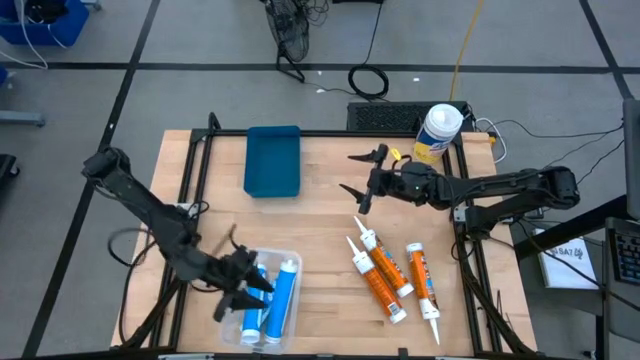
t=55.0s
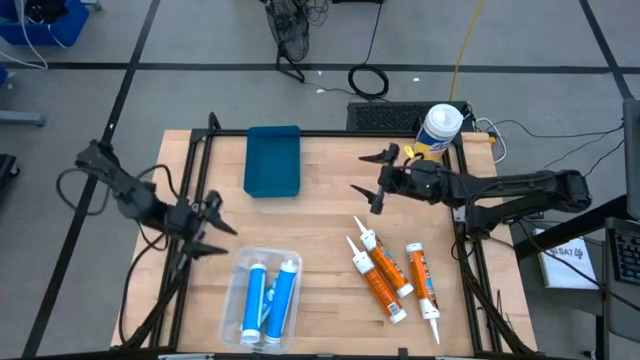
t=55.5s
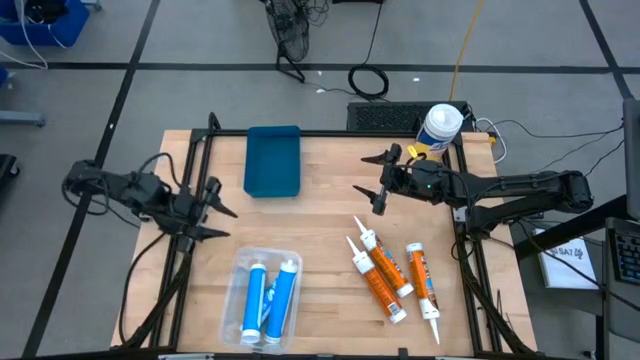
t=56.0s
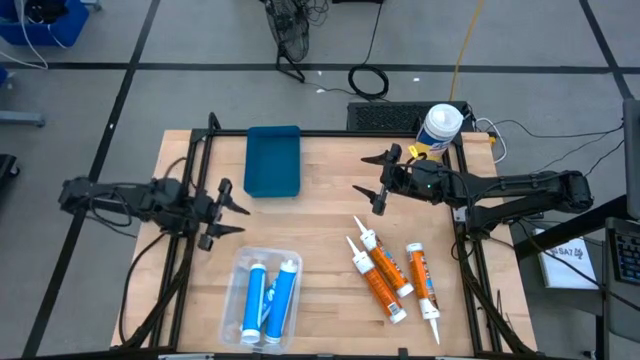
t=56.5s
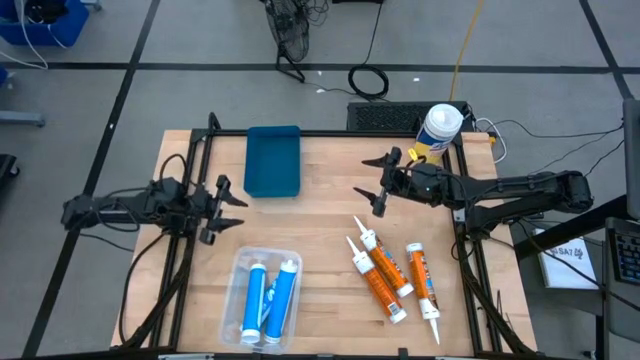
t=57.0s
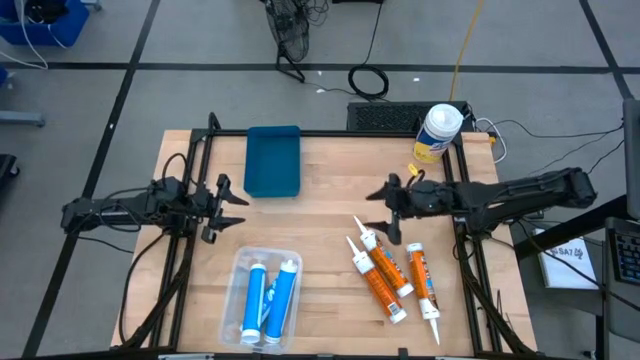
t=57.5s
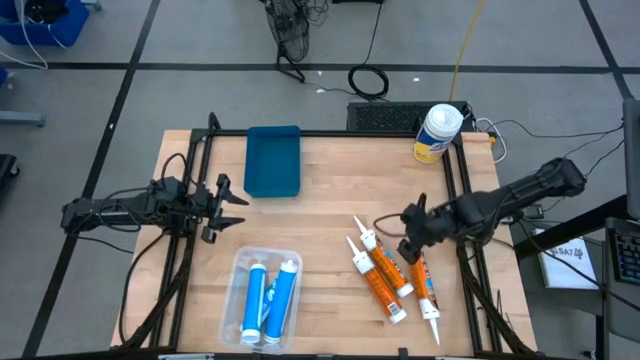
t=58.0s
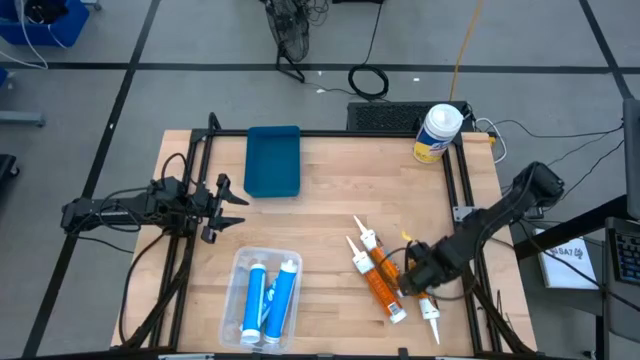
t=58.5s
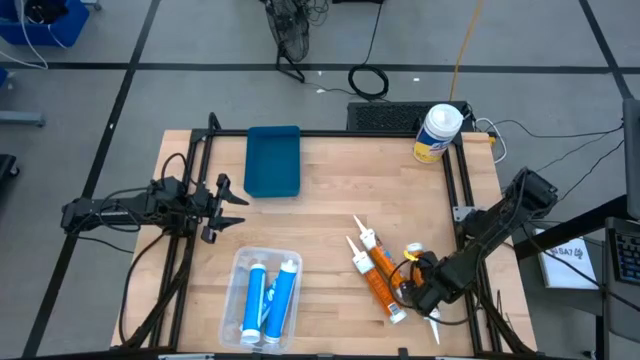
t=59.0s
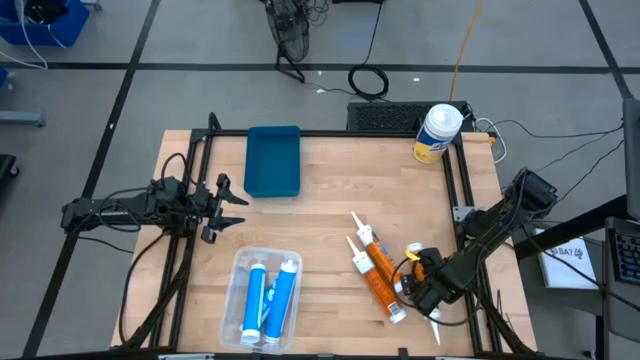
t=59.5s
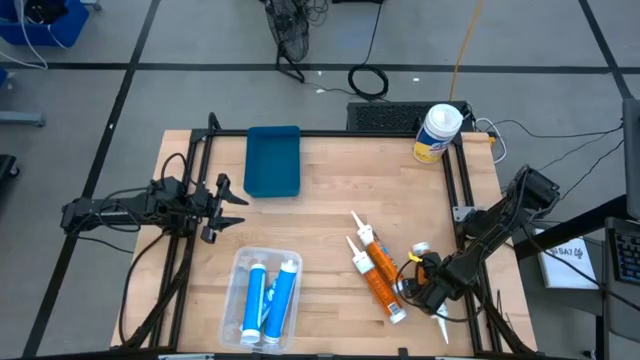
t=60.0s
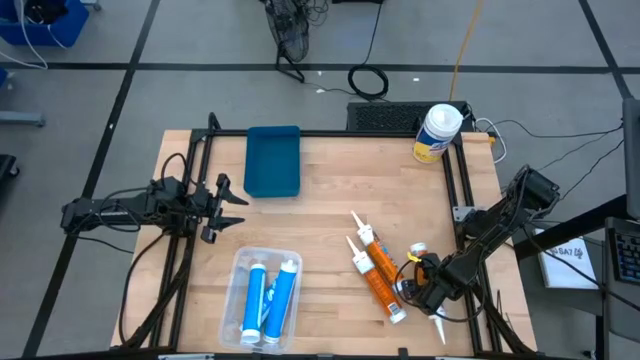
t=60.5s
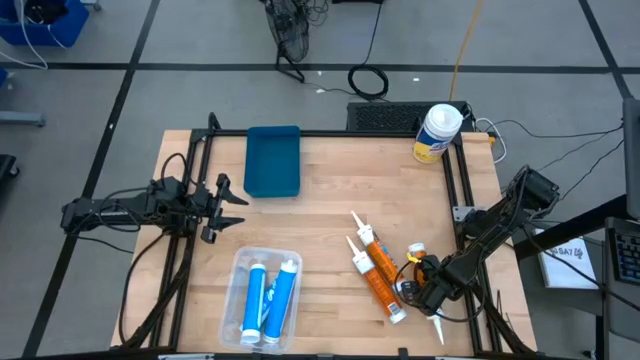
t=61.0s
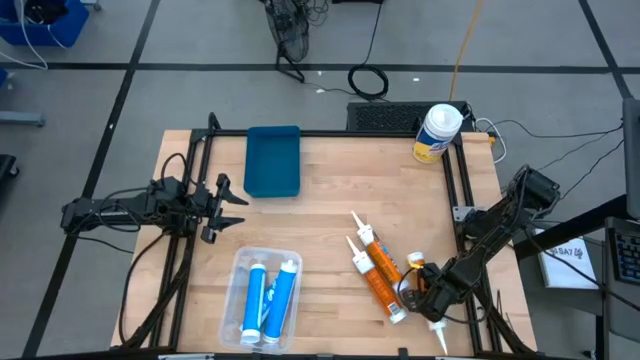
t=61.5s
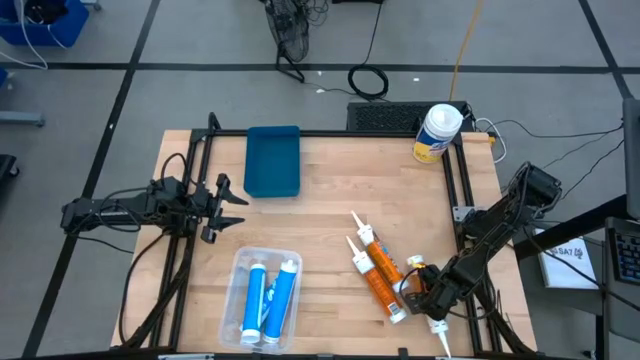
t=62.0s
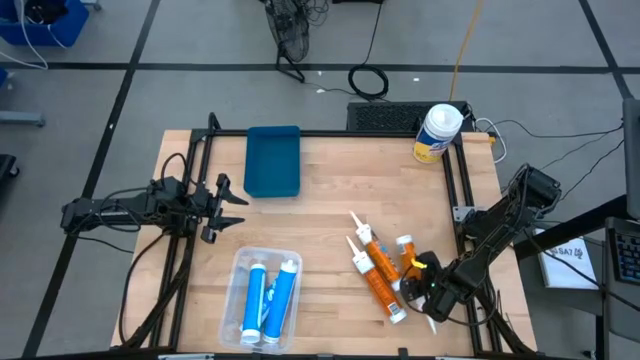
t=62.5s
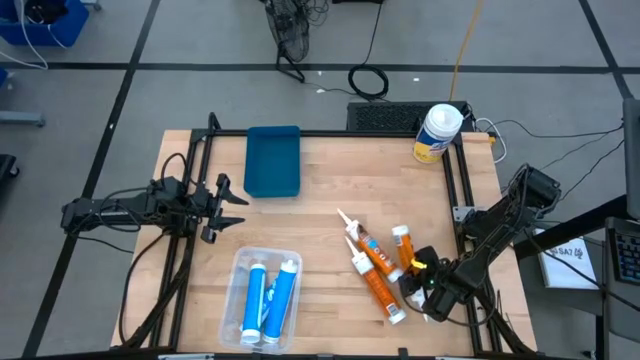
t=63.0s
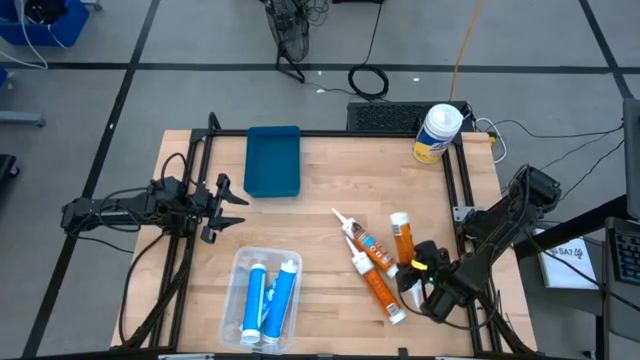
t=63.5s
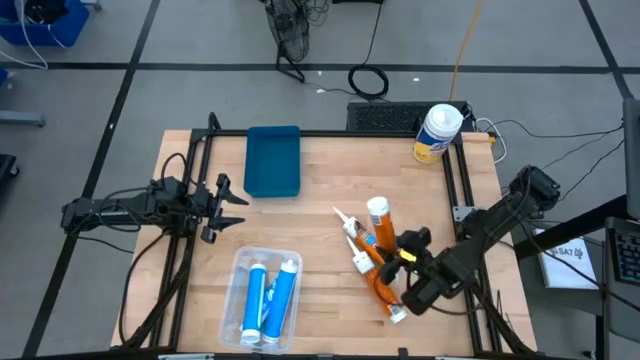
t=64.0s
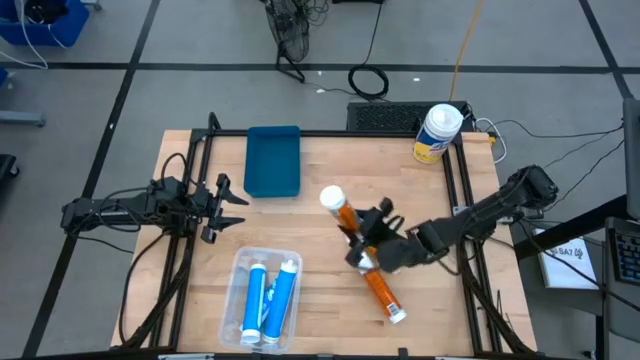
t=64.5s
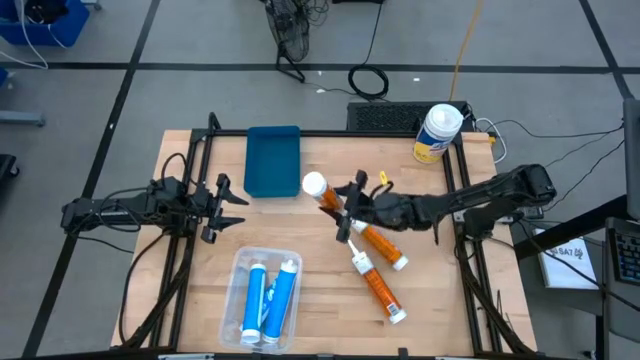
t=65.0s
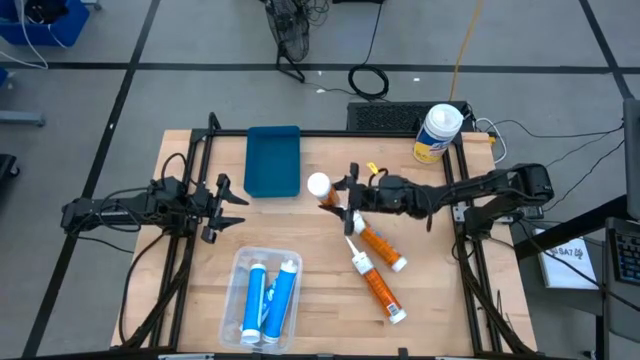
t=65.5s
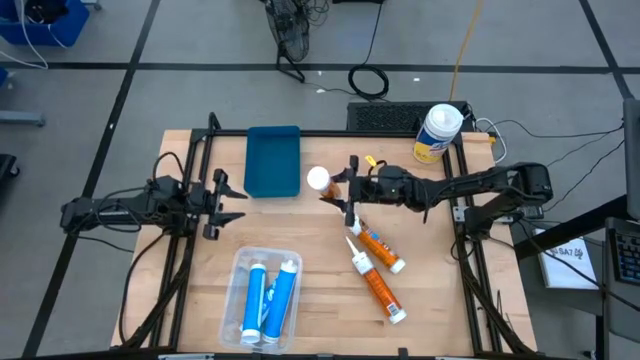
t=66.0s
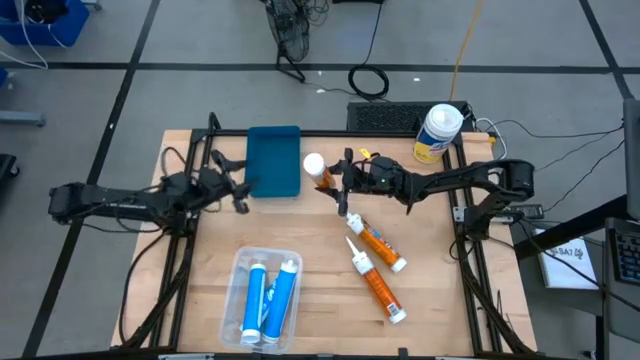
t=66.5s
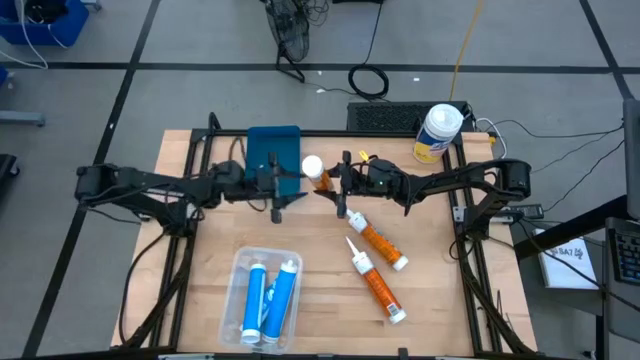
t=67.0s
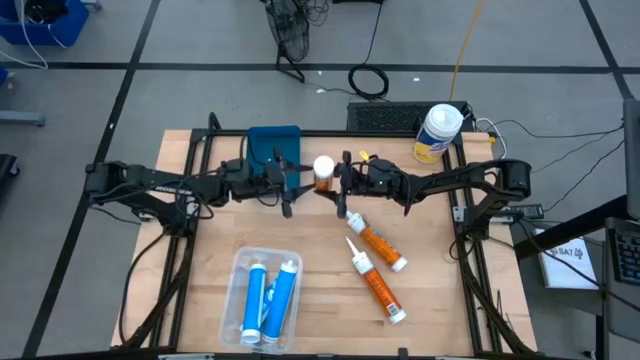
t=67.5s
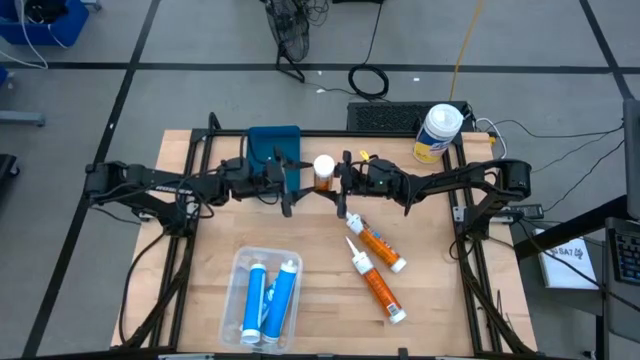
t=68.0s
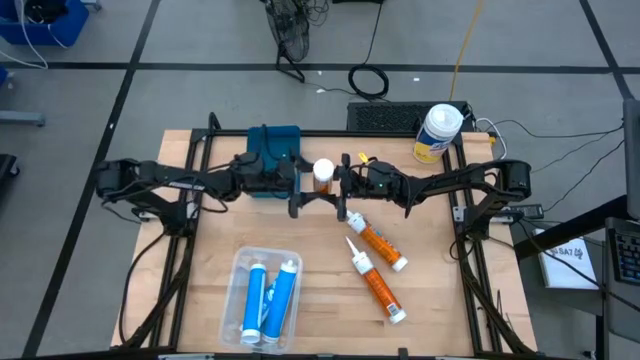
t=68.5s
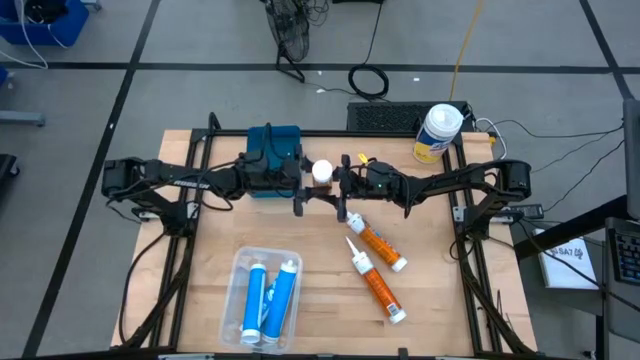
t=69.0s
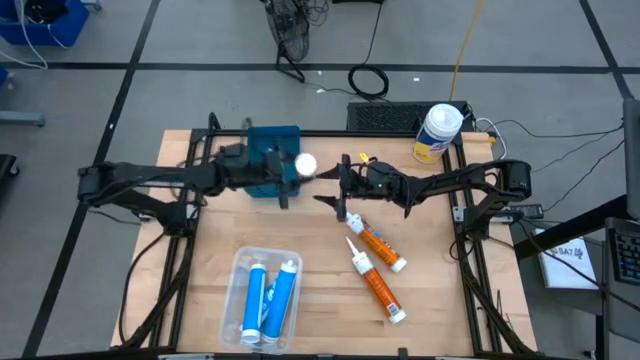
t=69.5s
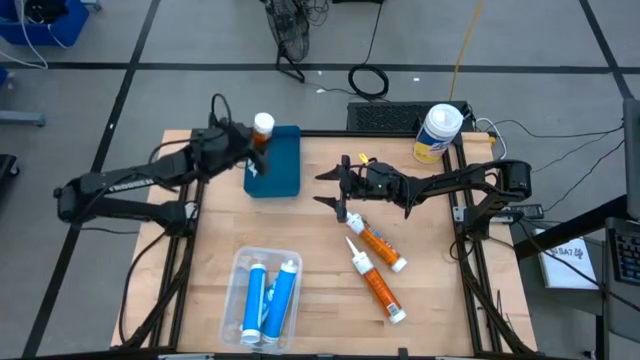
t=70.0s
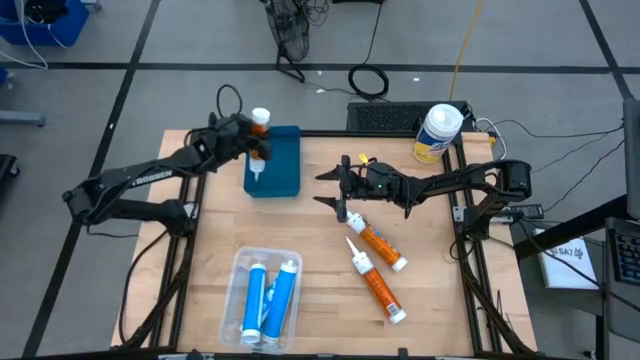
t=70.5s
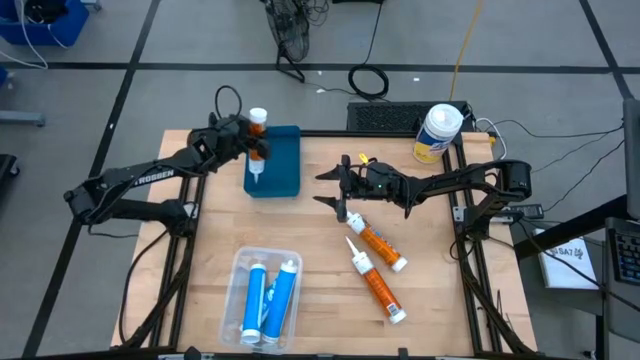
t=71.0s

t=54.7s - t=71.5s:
Task: Pick & place silicon tubes, Sealant and Lysol wipes
Put the right orange sealant into the blue bin

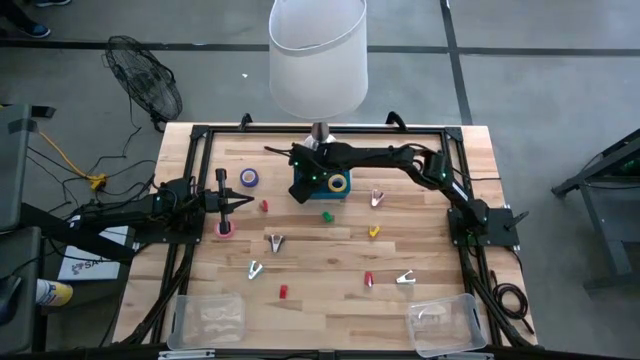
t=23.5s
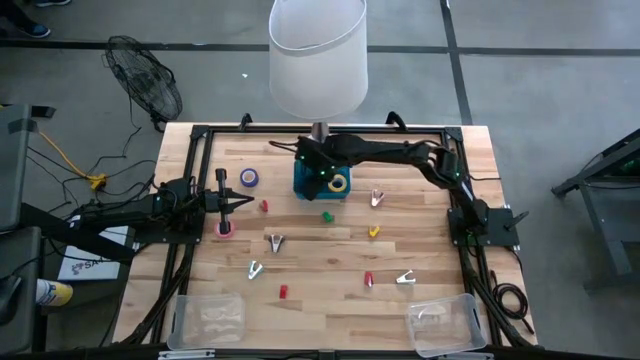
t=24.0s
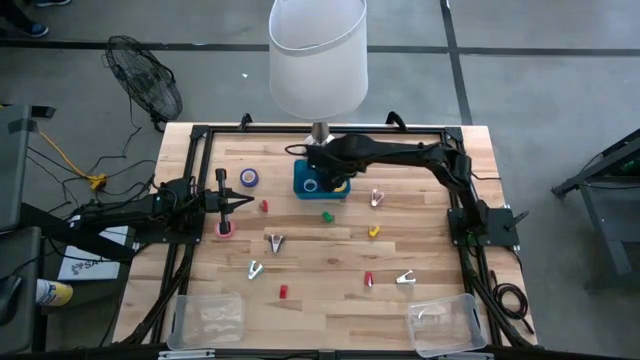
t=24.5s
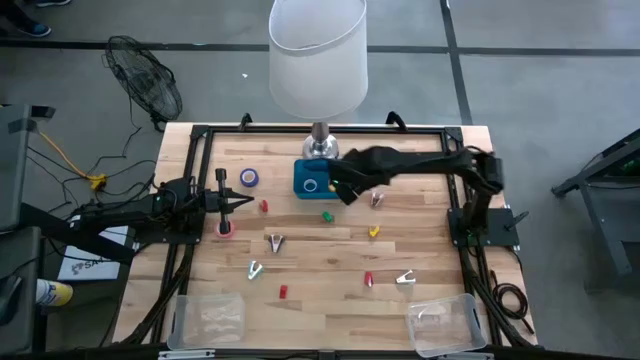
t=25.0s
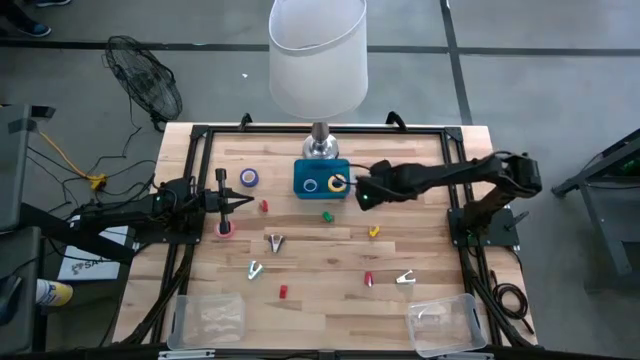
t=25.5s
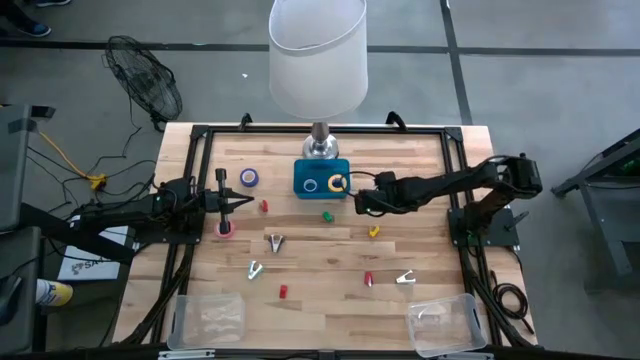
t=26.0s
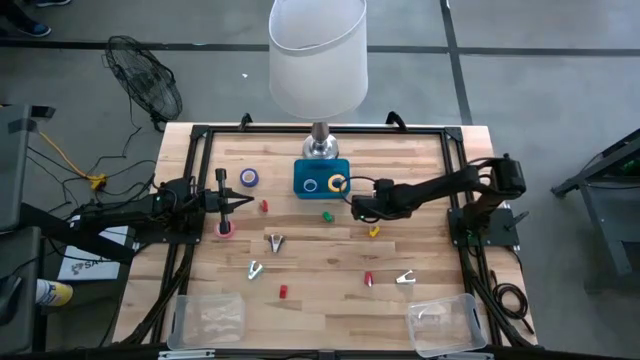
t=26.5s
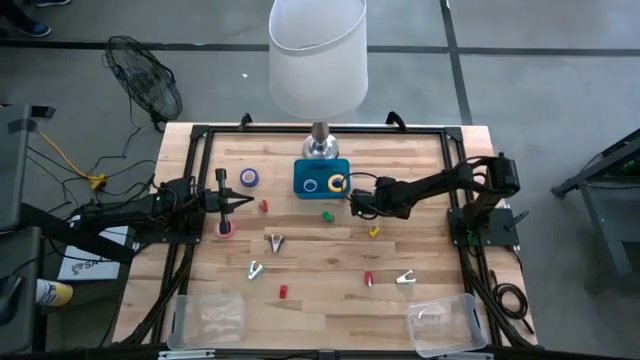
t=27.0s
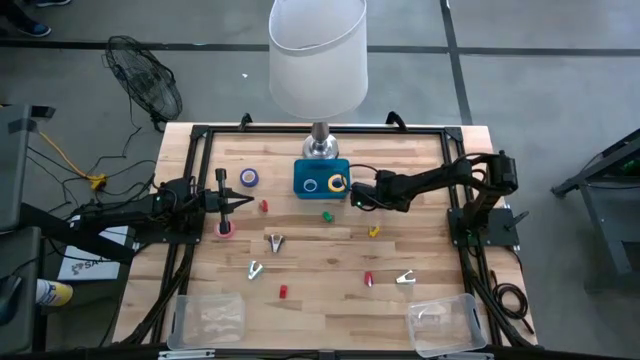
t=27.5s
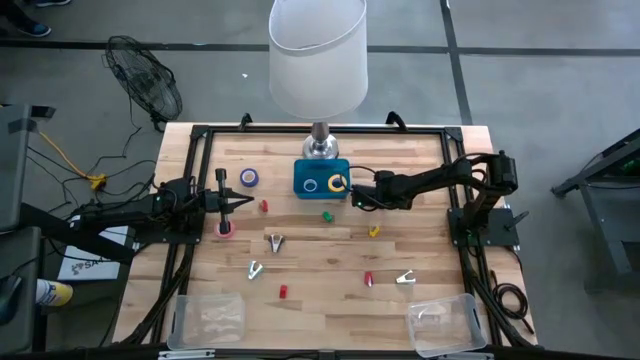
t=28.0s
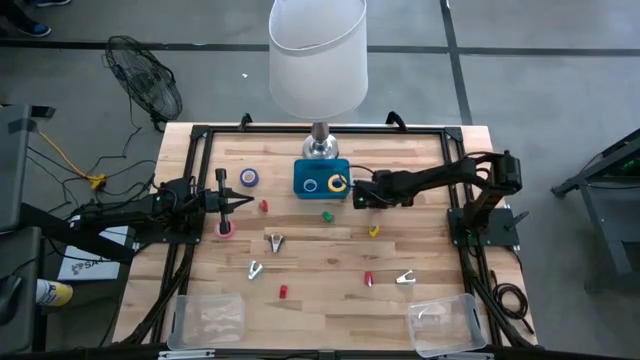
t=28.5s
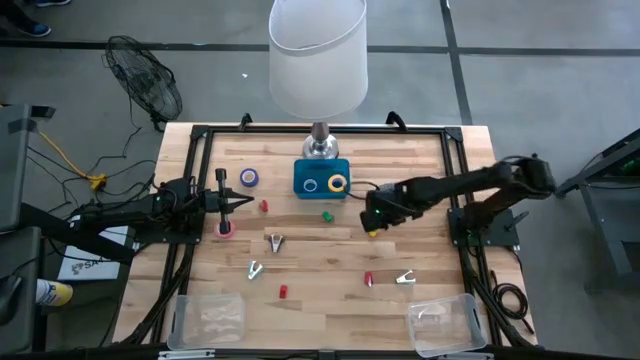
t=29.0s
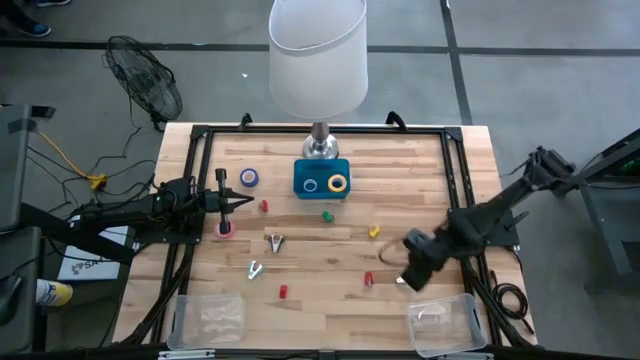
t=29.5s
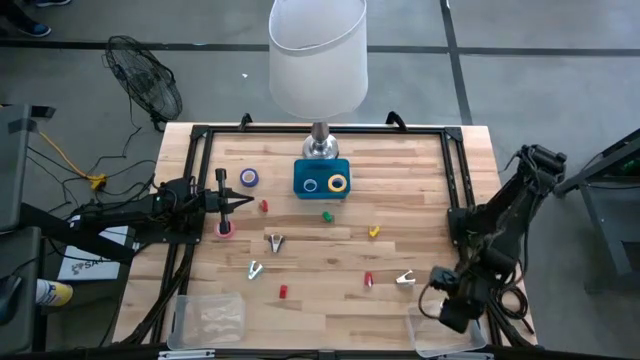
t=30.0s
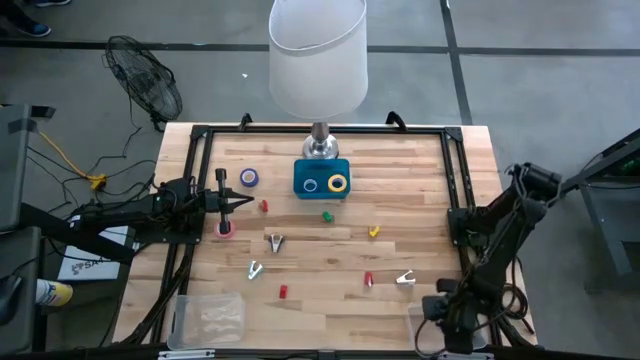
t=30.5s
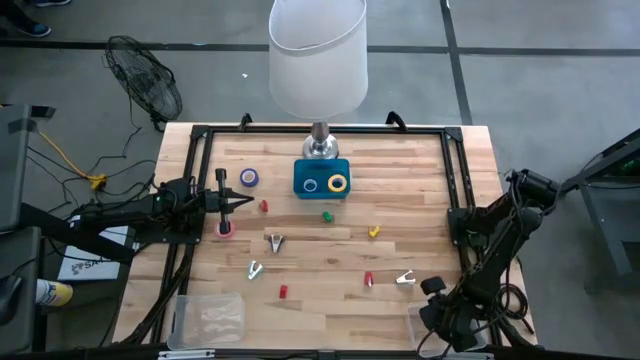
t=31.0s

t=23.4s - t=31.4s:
Task: Pick and place Stapler, Stapler remover, tape
Put the pink staple remover into the right transparent bin
